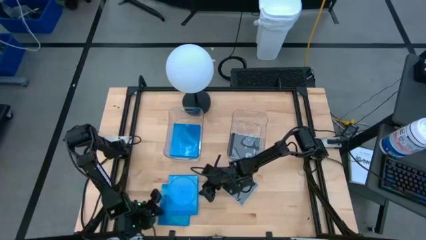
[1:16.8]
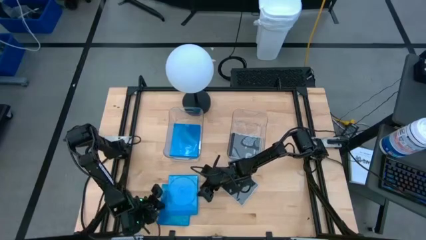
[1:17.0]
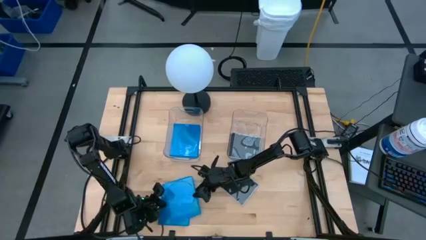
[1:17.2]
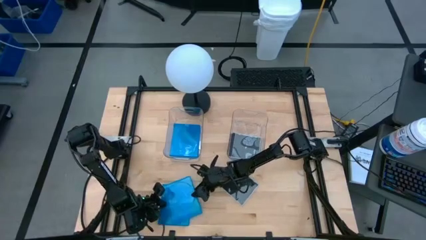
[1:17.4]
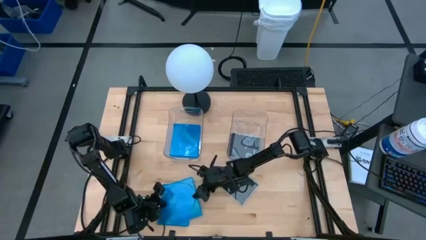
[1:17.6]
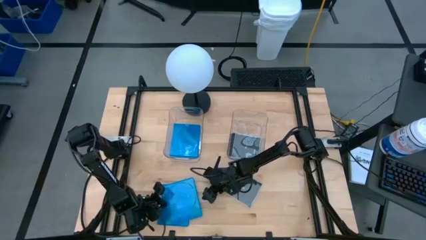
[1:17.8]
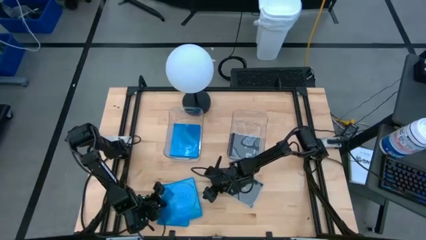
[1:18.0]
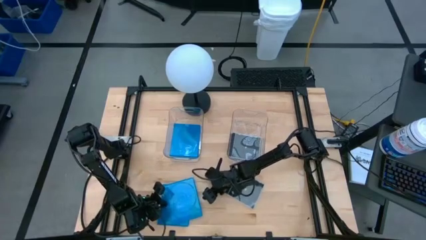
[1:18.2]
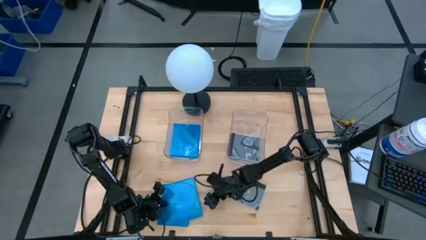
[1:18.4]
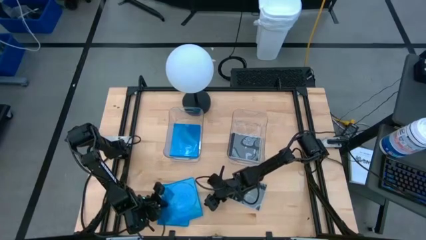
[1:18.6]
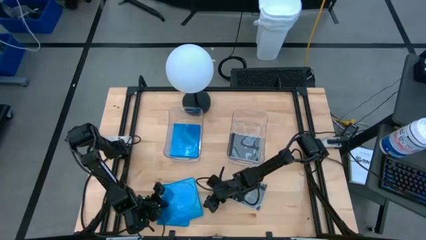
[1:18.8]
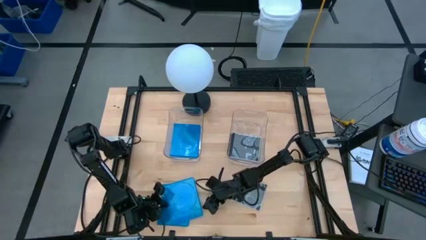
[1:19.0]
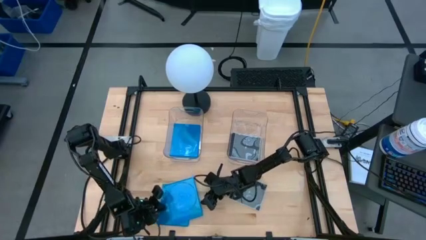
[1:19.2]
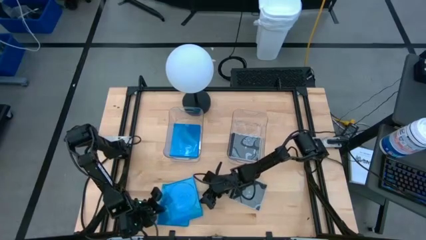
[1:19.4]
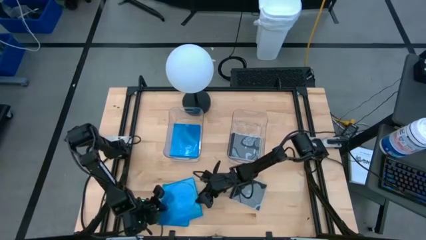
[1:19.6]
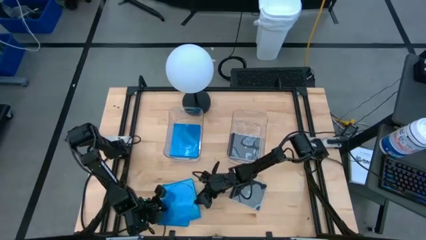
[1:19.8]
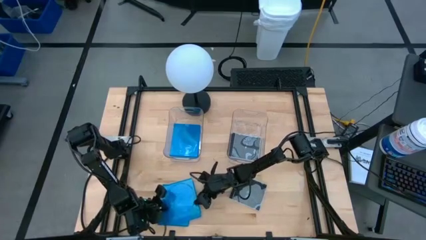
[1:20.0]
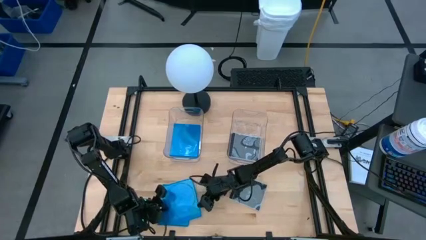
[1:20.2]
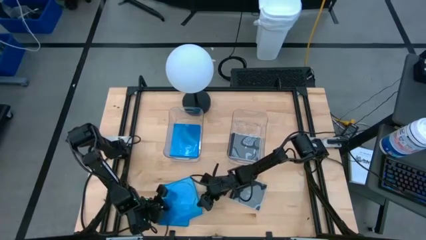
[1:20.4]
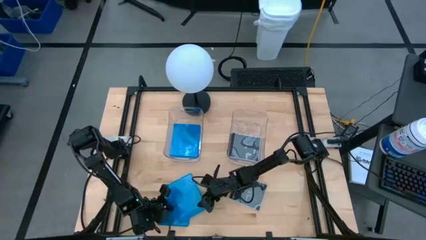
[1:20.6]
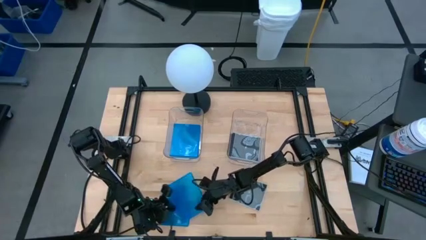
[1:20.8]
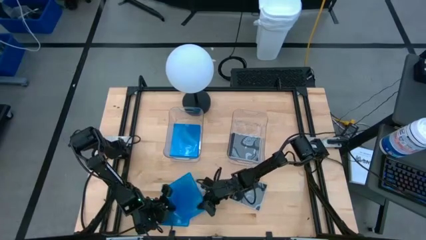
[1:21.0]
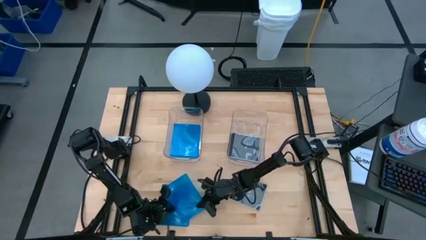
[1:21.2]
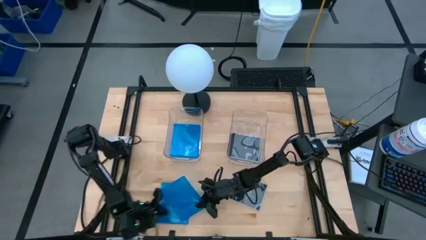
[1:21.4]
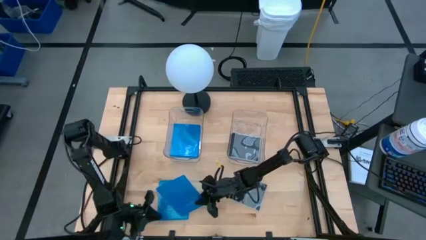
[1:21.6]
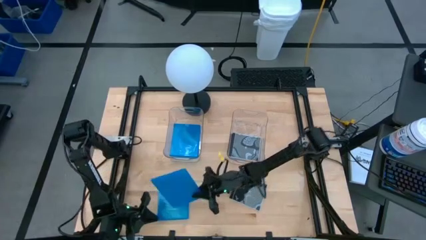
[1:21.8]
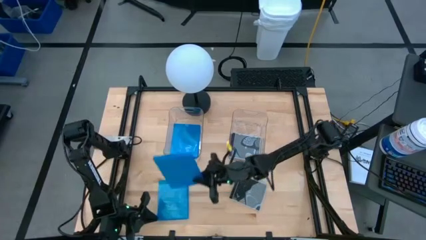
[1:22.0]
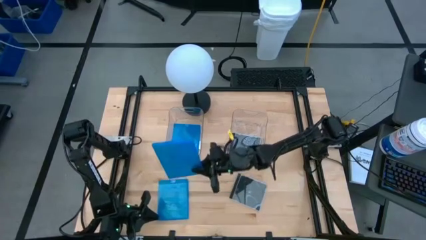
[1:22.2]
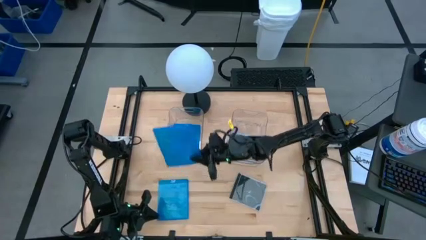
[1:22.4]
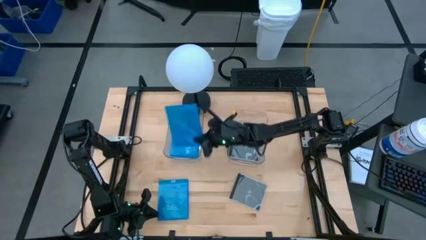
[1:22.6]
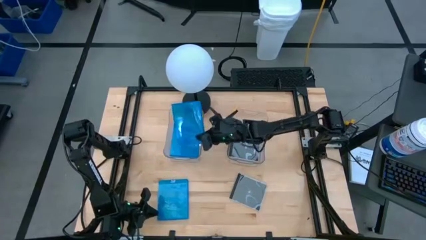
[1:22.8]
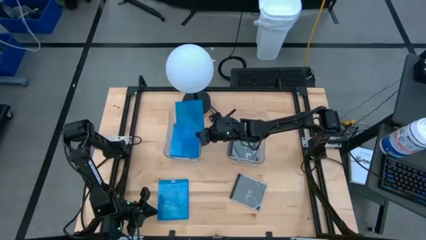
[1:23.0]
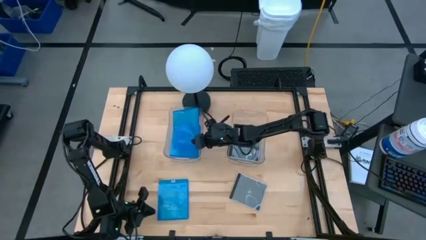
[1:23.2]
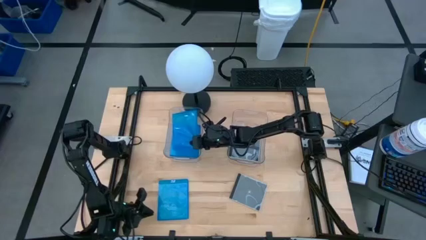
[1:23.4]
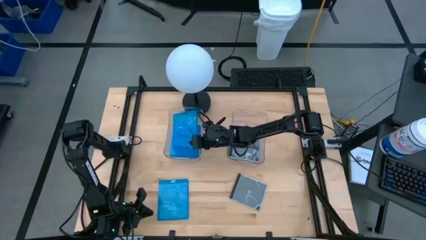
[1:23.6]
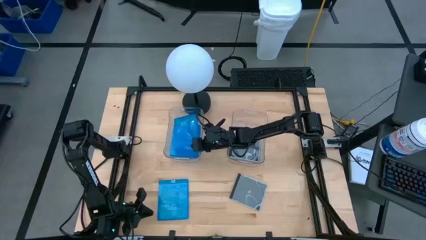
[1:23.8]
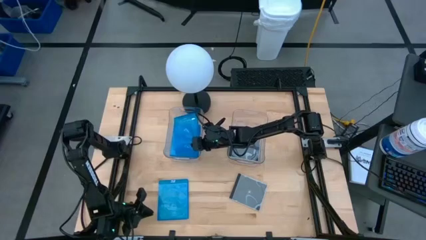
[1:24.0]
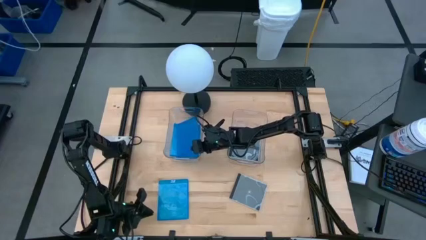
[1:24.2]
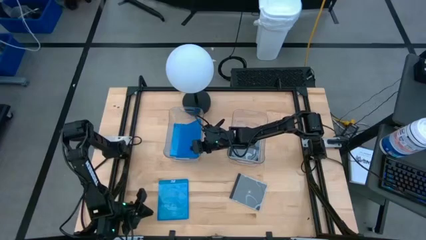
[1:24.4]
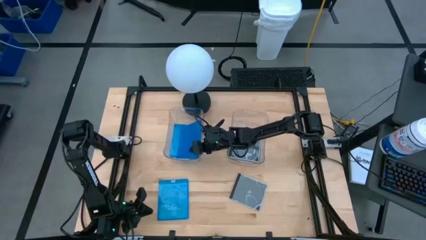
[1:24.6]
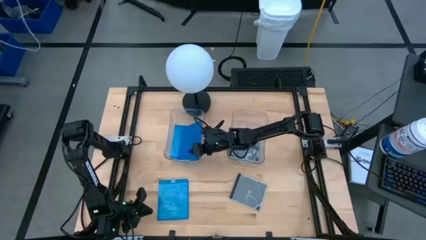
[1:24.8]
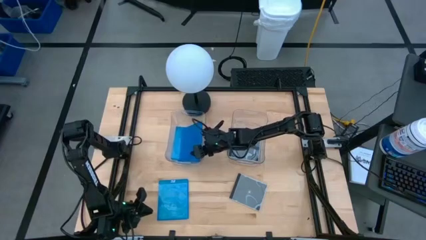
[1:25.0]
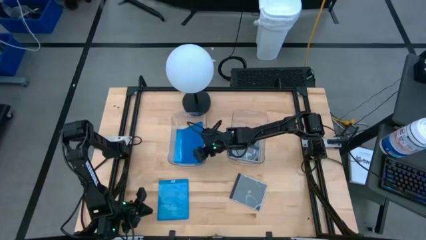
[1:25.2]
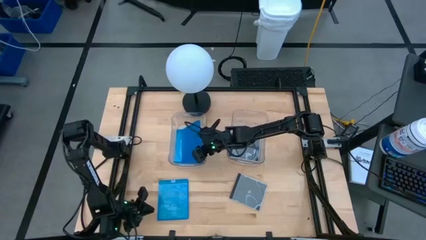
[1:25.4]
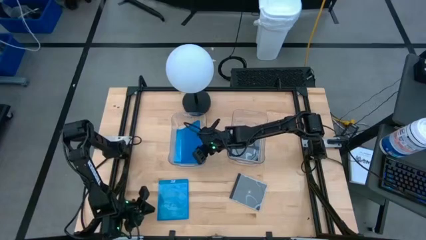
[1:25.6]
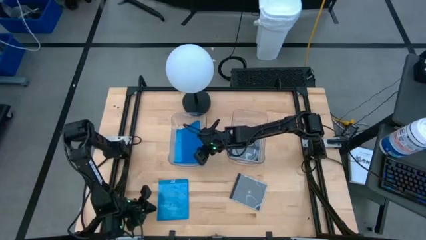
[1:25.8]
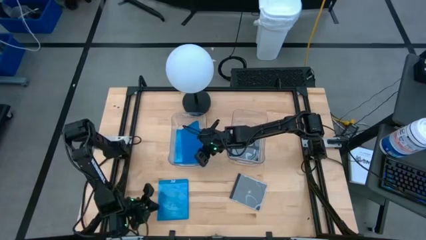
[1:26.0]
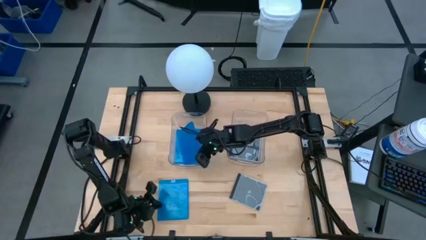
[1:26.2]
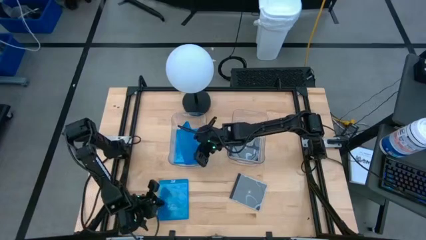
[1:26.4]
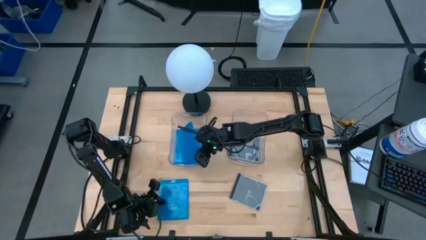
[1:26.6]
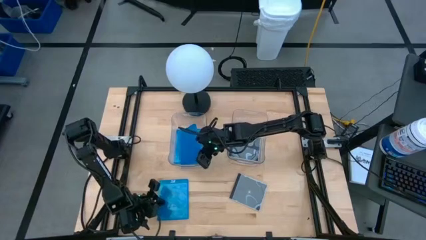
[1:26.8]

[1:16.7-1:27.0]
Task: Pick & place jewel cases by type
Put the blue CD case into the left transparent bin
